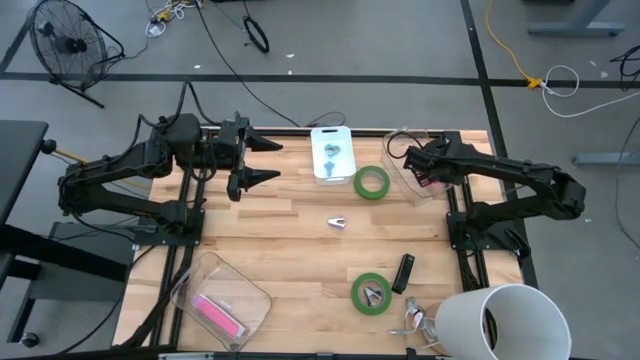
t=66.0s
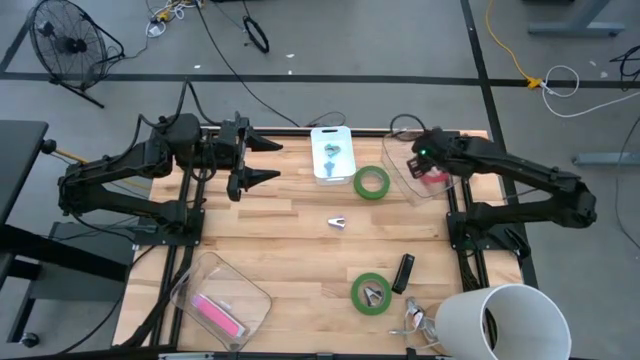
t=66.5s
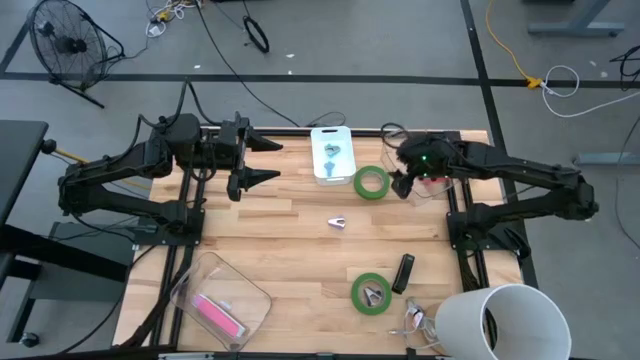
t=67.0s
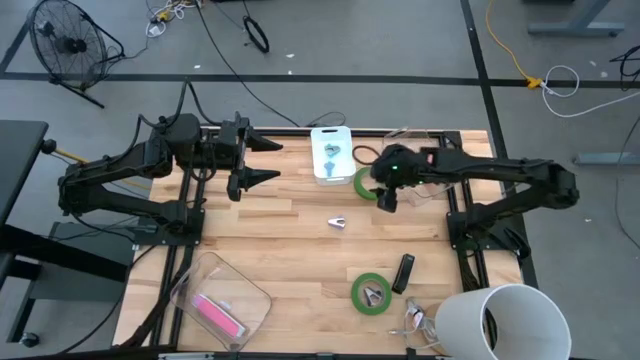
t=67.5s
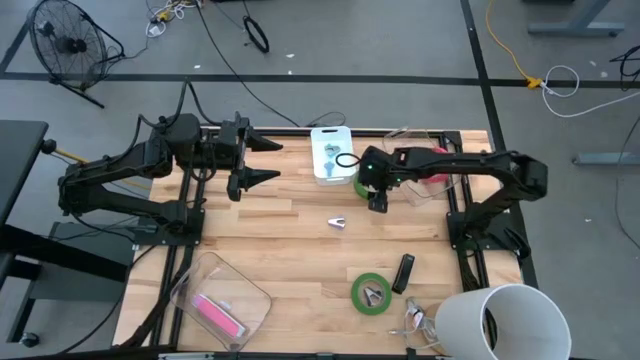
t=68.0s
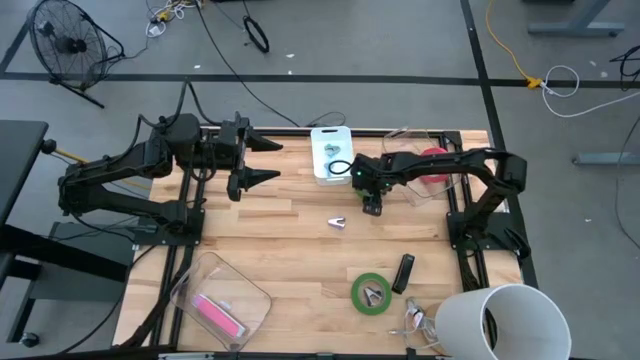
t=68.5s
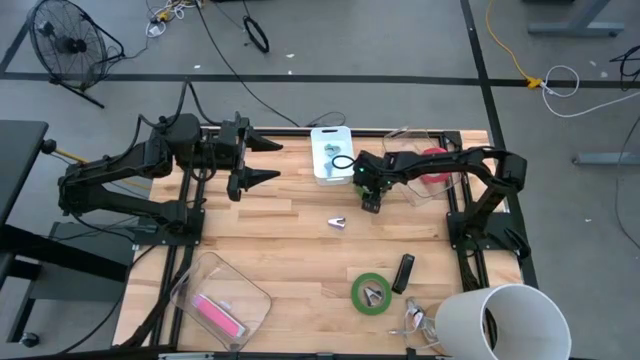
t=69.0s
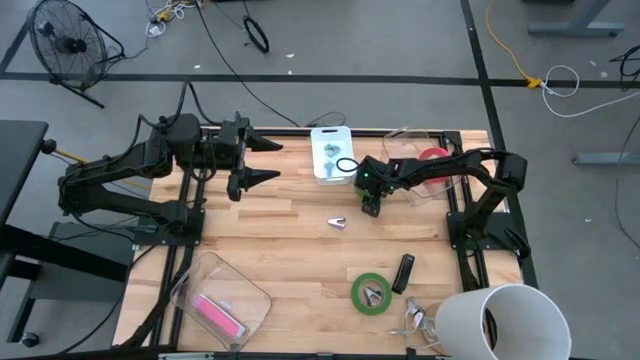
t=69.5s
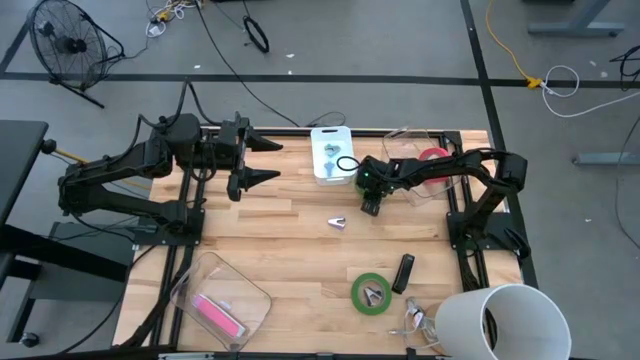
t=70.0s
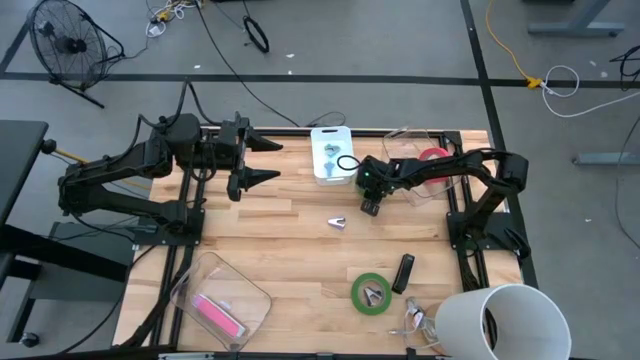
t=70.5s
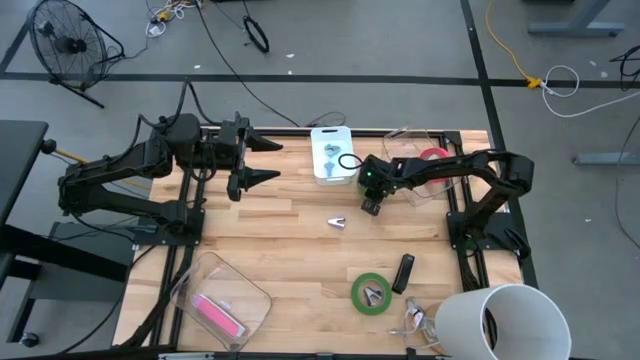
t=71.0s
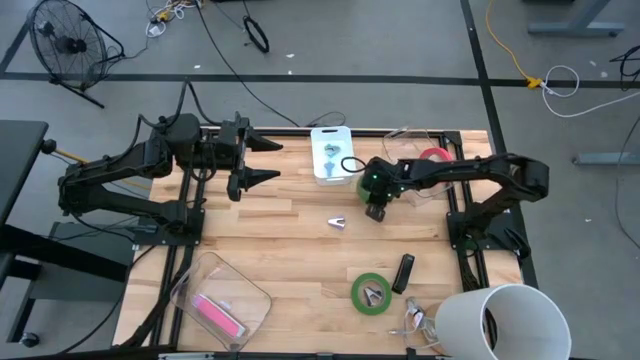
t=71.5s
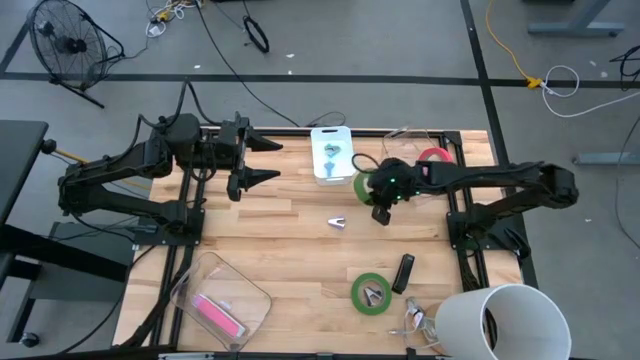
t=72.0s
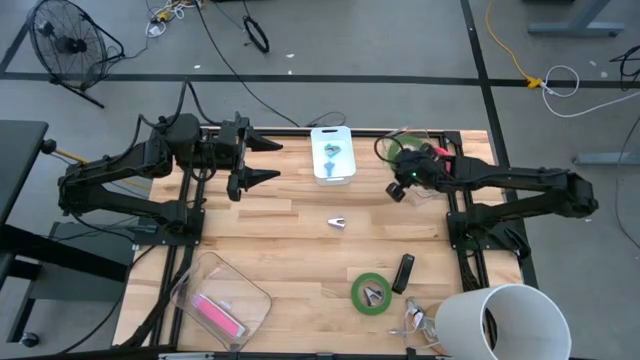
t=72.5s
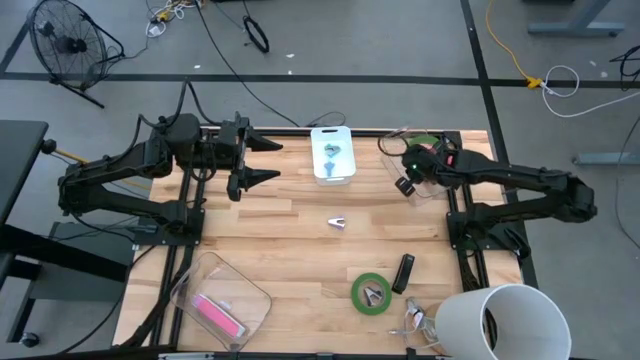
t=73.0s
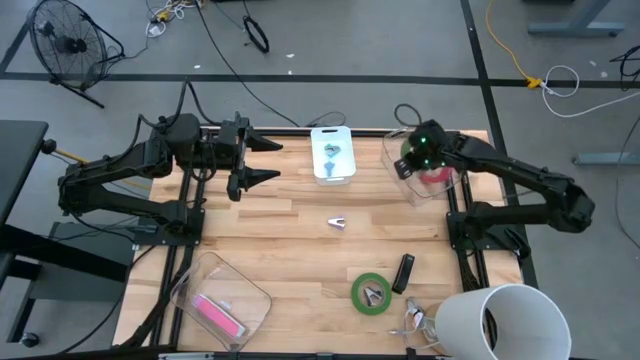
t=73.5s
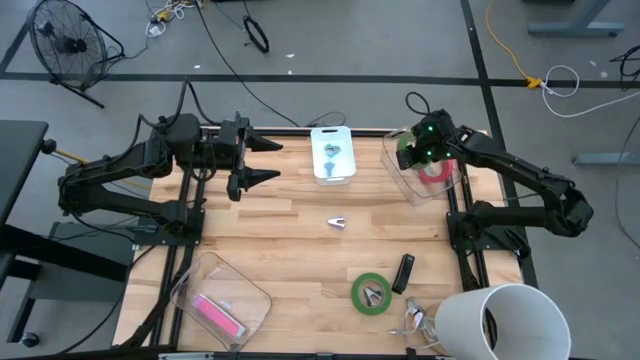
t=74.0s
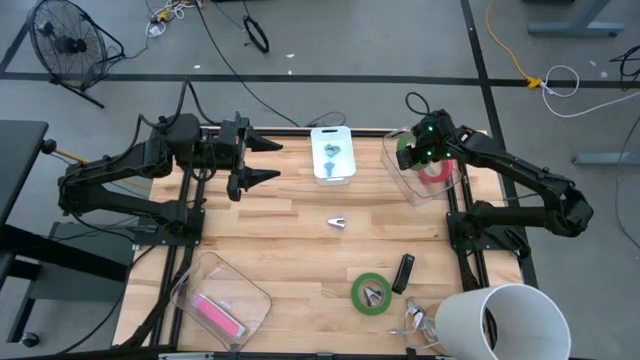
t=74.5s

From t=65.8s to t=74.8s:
Task: Pick and place Stapler, Stapler remover, tape
Put the green tape into the top transparent bin

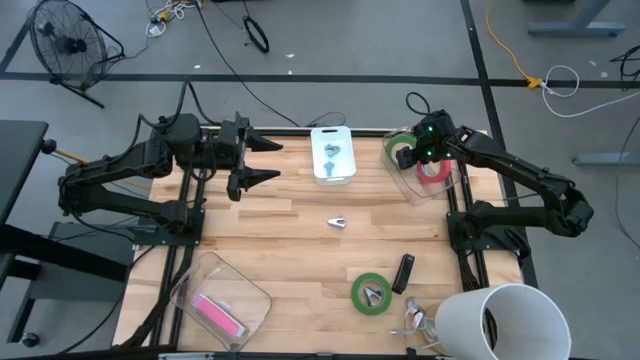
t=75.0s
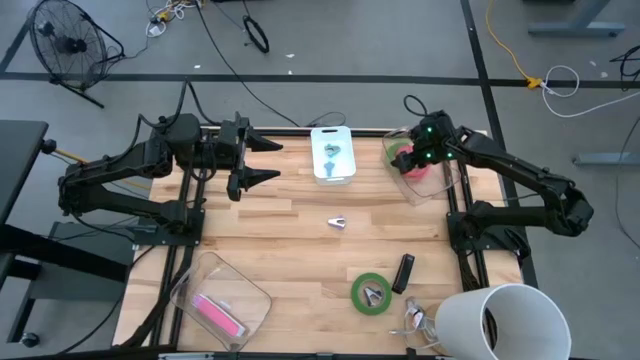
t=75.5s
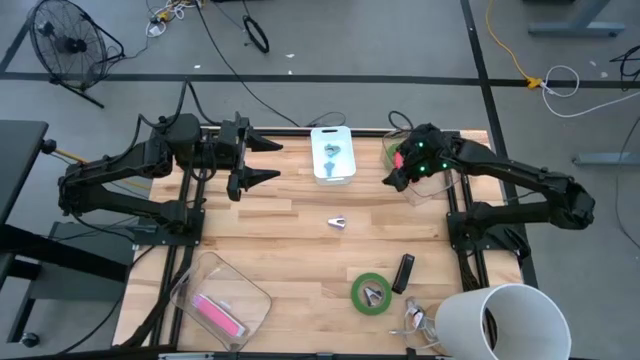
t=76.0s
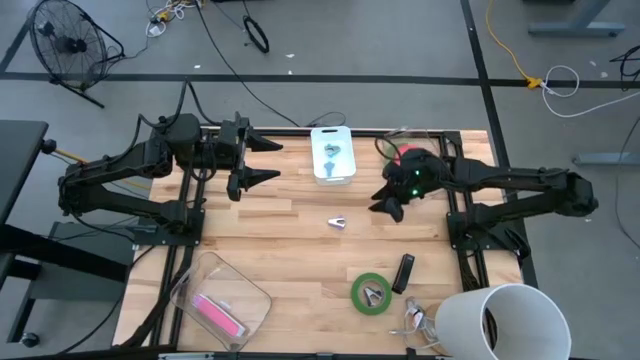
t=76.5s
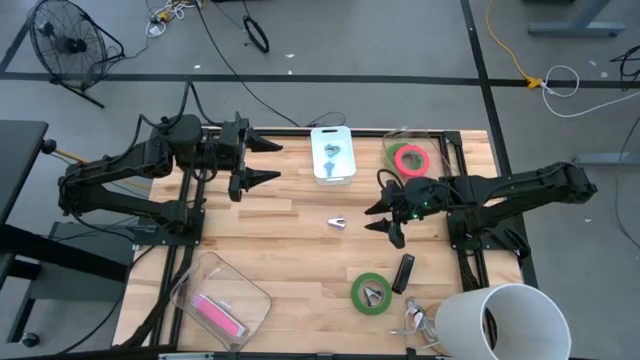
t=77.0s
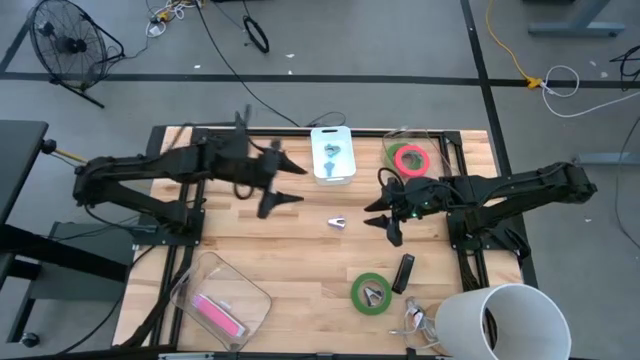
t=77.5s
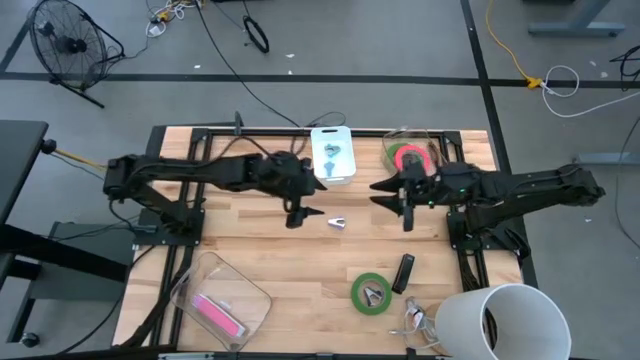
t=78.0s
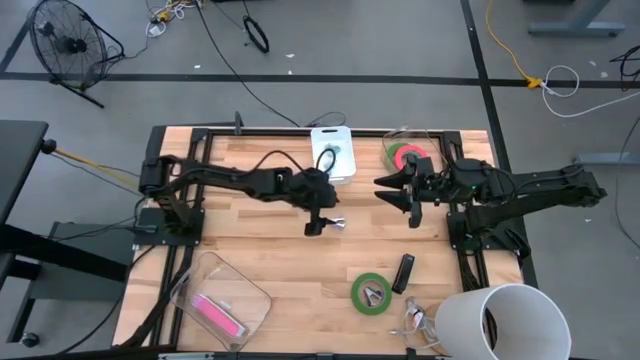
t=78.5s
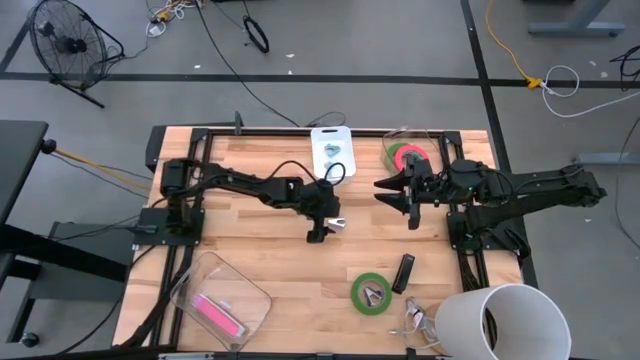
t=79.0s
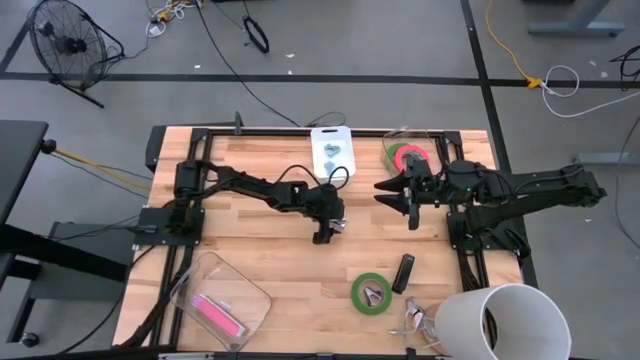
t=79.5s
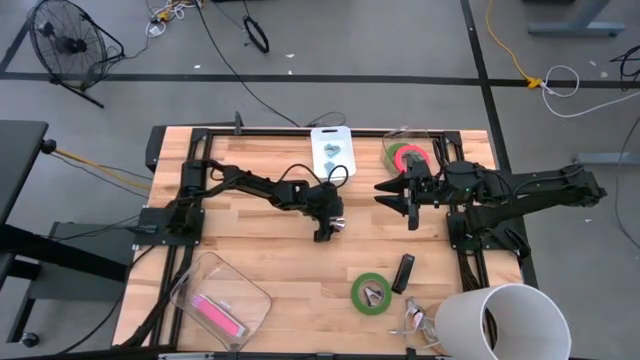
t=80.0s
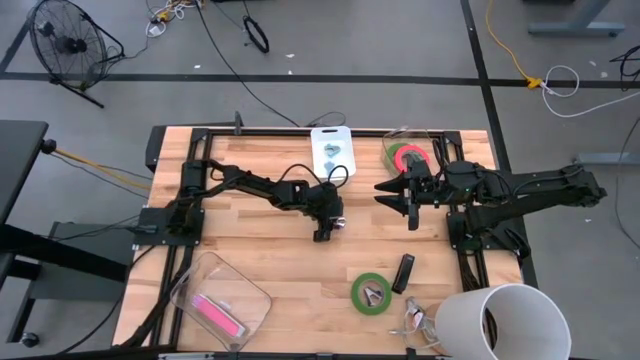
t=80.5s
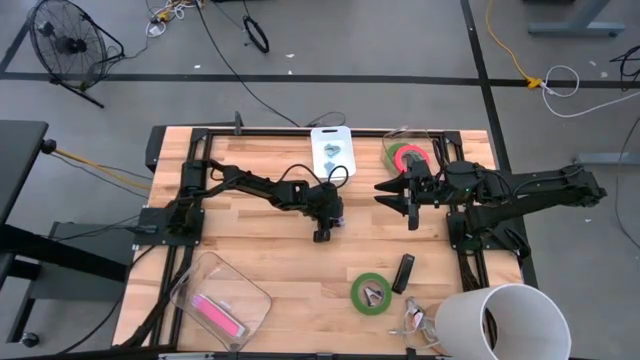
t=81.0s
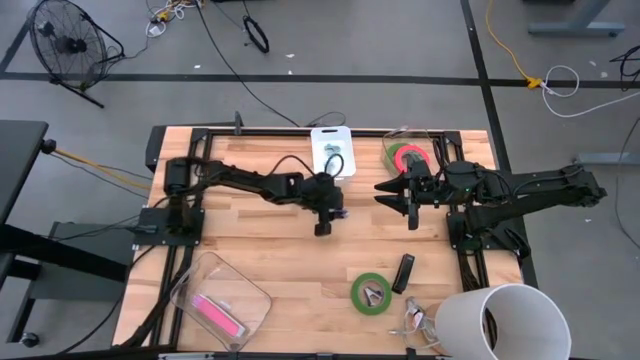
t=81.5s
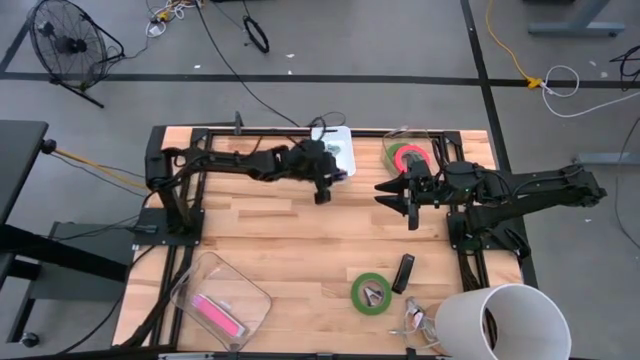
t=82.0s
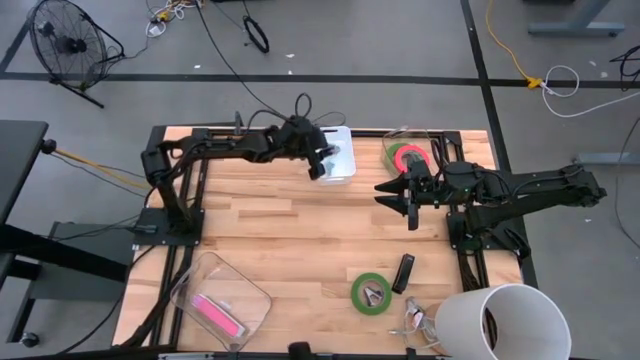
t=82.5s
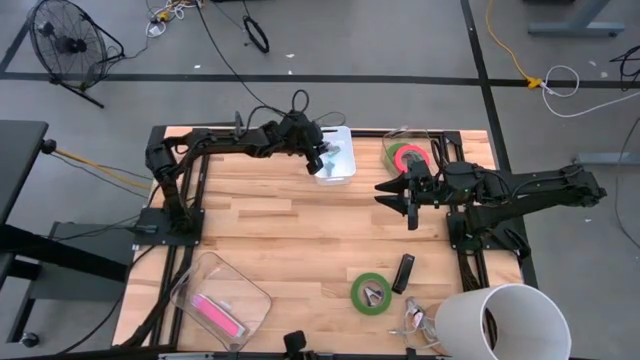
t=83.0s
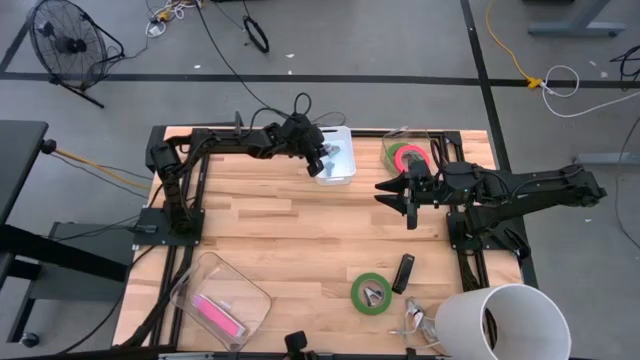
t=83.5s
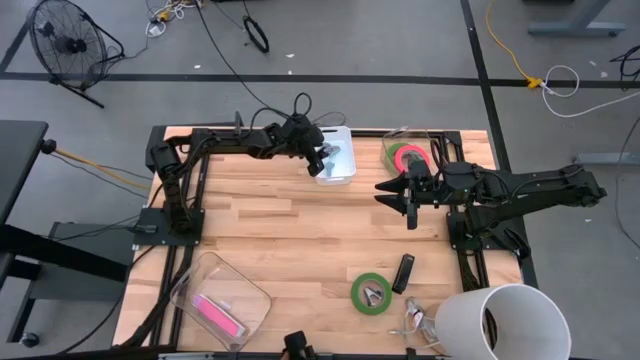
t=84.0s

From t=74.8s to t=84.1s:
Put the purple staple remover into the white bin

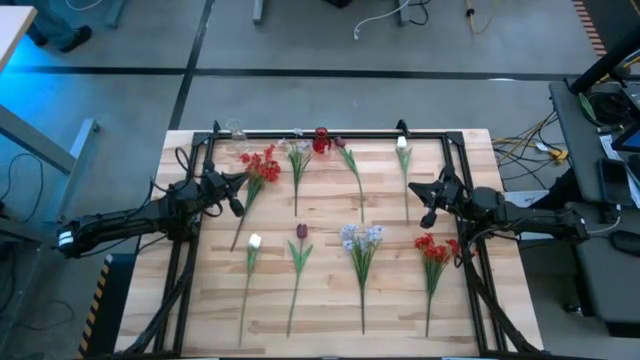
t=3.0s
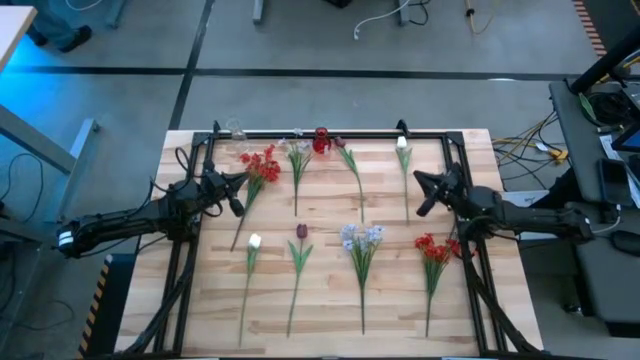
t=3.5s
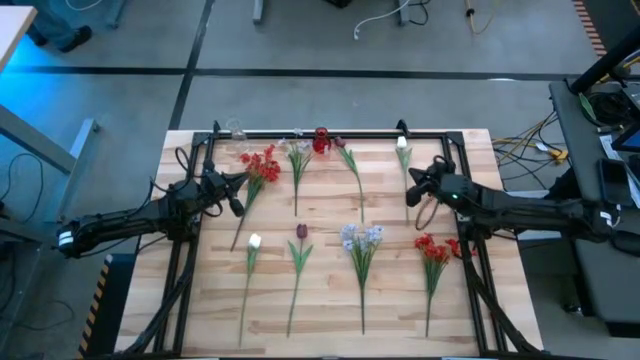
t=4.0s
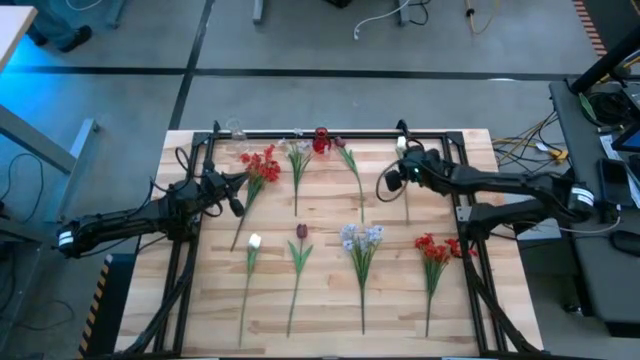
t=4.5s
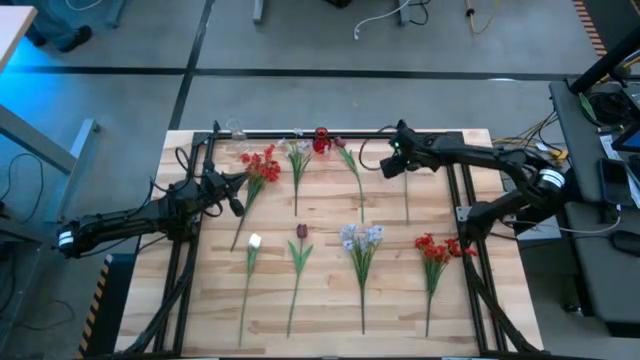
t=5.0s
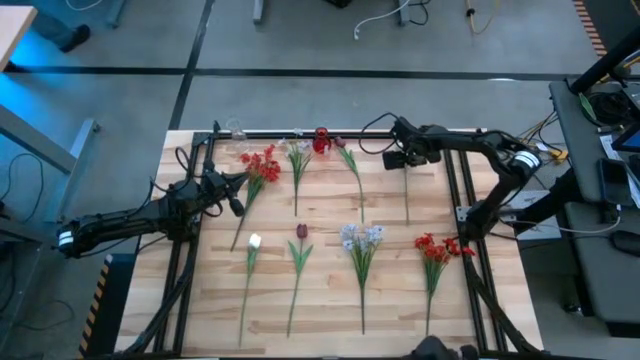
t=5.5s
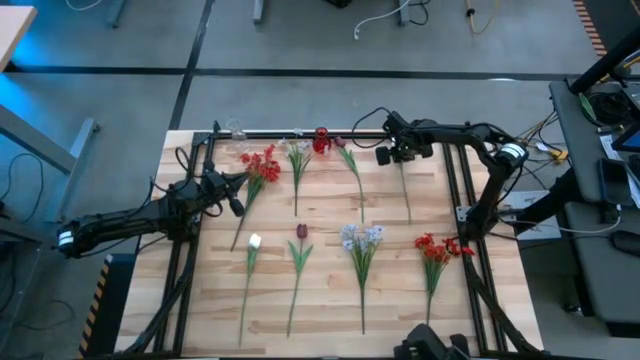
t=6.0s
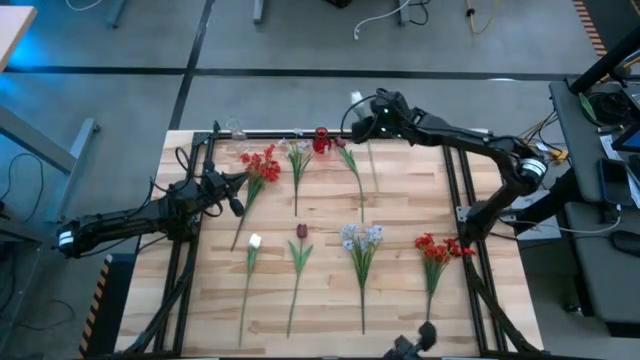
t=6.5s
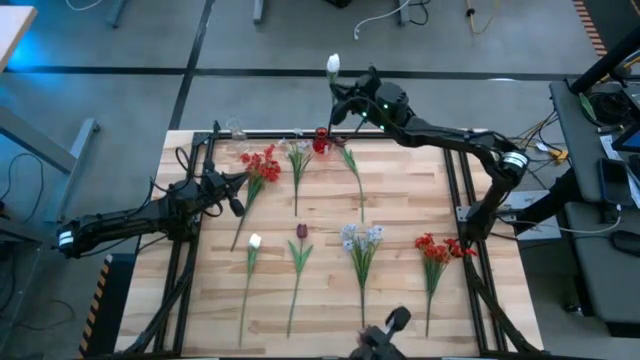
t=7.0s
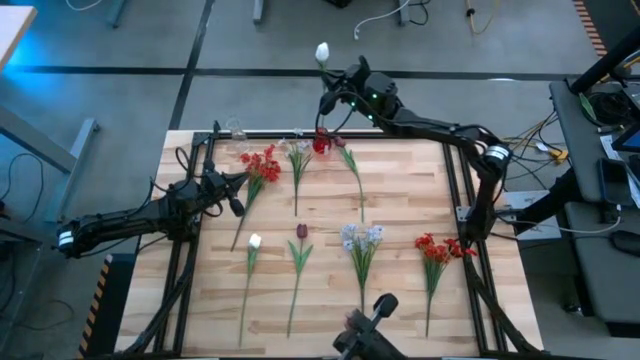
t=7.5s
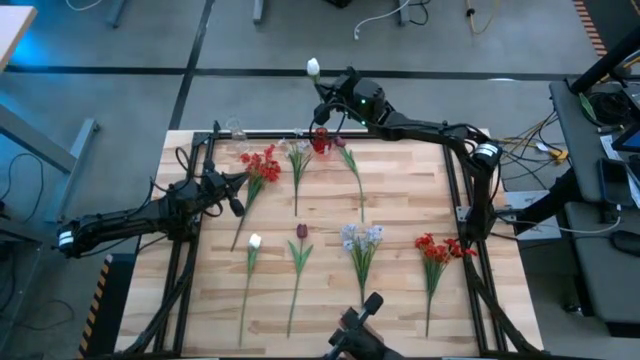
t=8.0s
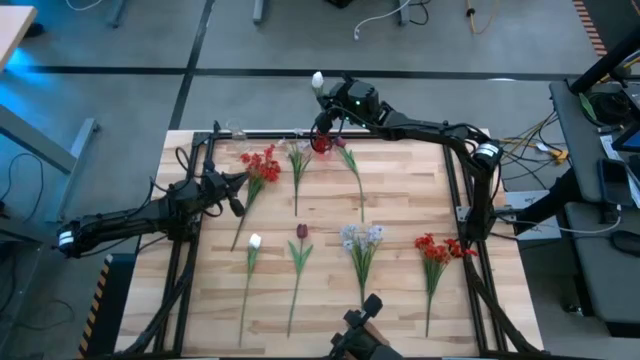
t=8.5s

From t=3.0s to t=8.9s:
Task: Sort flowers into vase by color
Put the top white flower into the red vase
